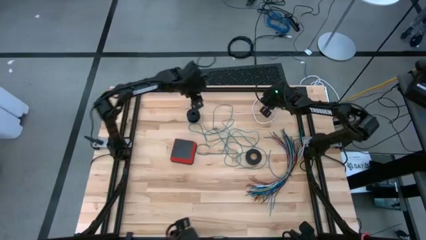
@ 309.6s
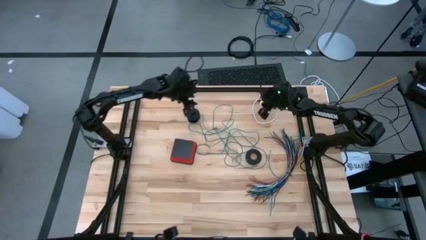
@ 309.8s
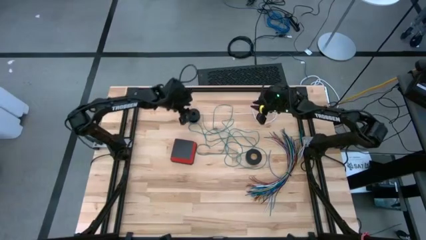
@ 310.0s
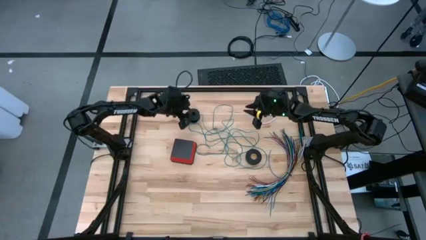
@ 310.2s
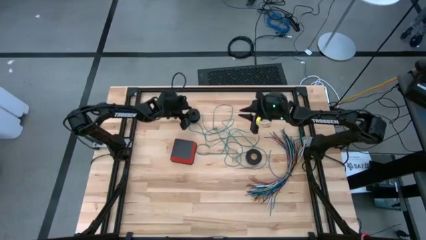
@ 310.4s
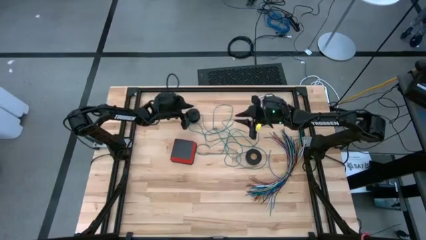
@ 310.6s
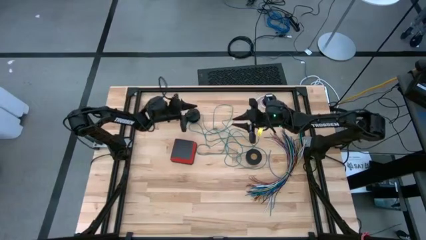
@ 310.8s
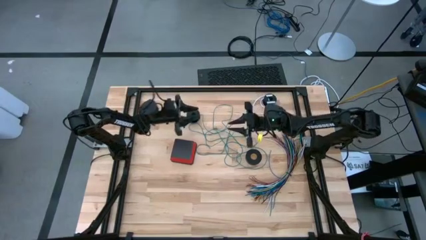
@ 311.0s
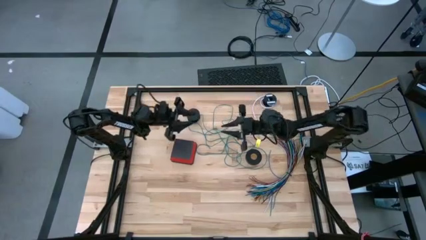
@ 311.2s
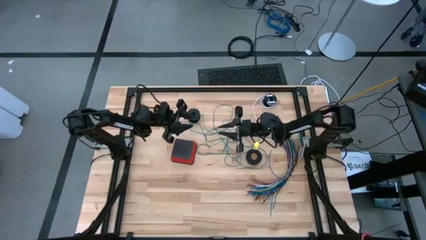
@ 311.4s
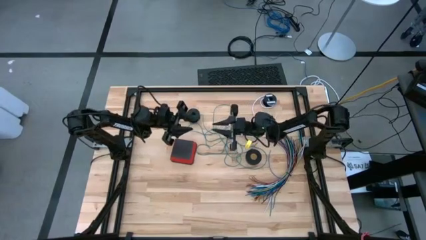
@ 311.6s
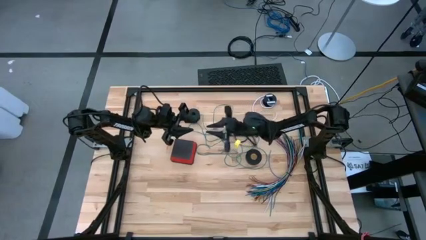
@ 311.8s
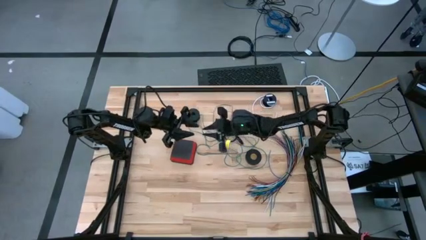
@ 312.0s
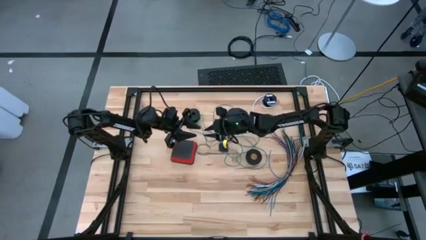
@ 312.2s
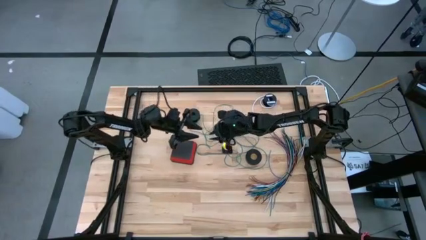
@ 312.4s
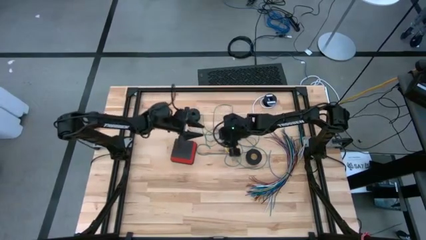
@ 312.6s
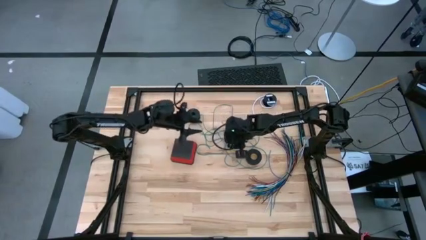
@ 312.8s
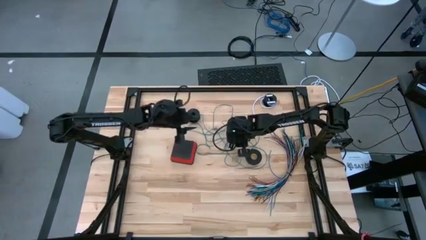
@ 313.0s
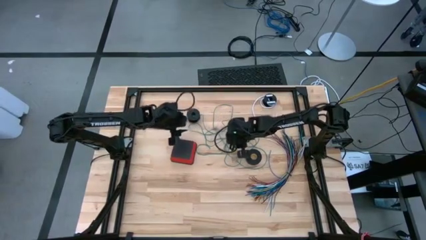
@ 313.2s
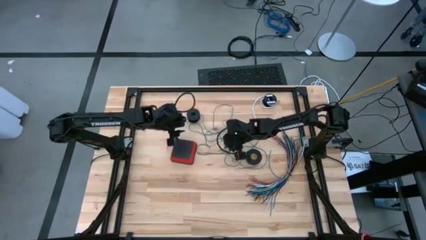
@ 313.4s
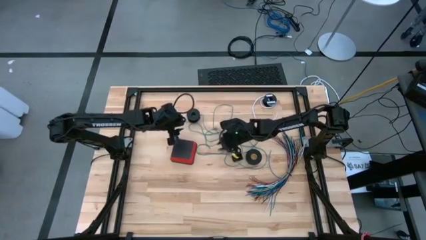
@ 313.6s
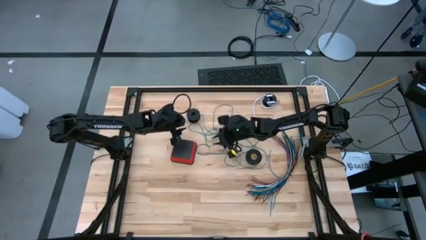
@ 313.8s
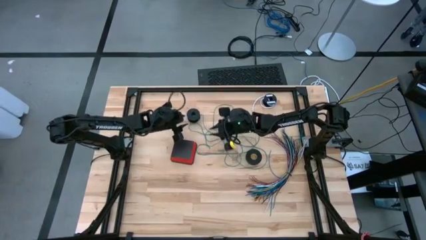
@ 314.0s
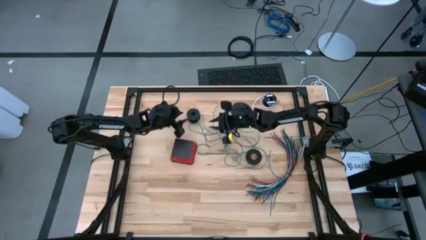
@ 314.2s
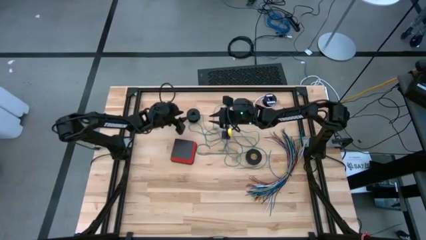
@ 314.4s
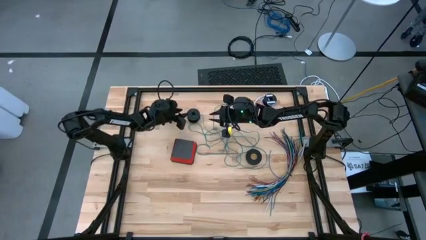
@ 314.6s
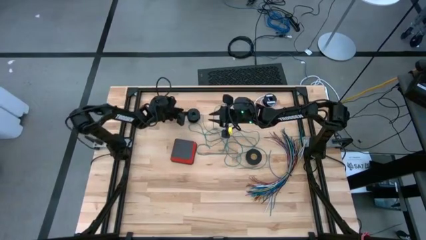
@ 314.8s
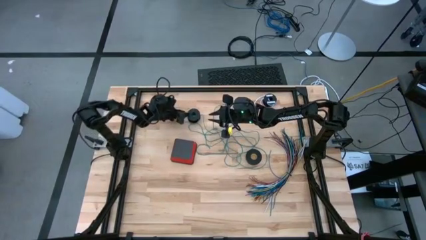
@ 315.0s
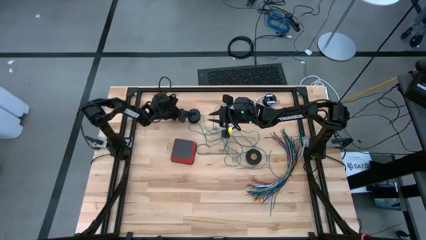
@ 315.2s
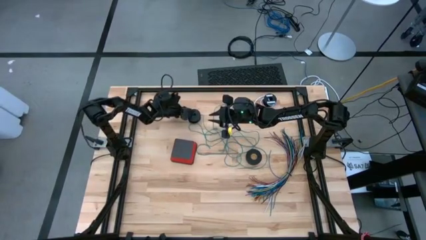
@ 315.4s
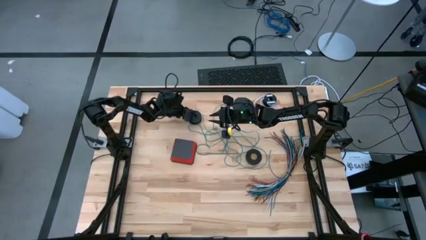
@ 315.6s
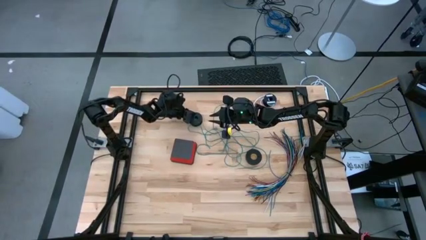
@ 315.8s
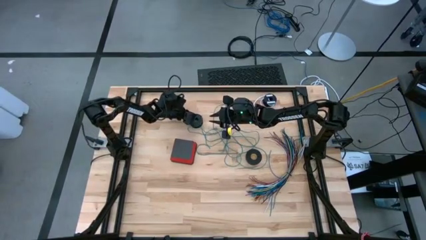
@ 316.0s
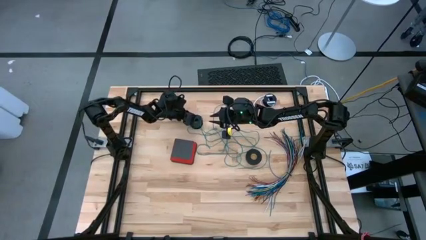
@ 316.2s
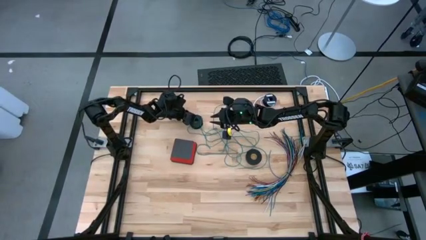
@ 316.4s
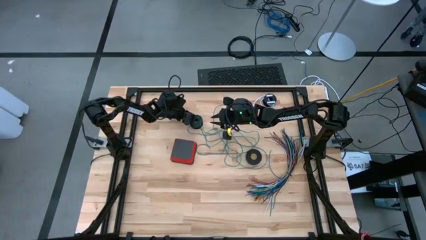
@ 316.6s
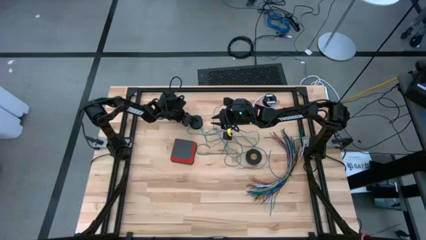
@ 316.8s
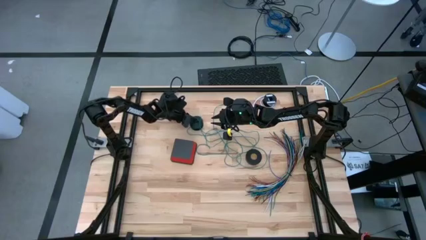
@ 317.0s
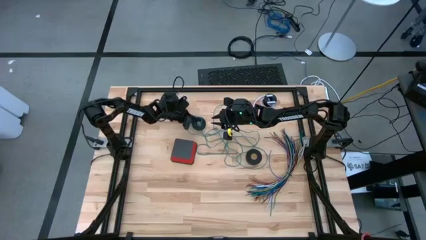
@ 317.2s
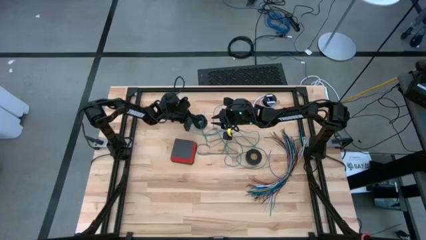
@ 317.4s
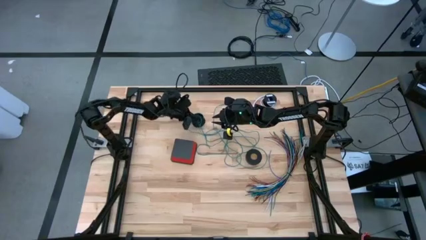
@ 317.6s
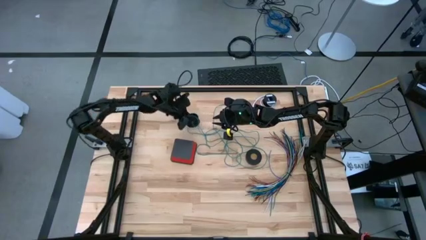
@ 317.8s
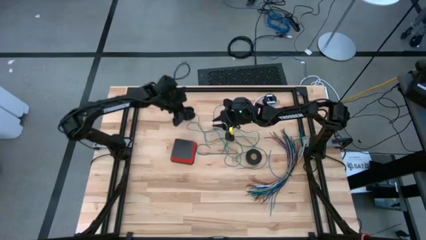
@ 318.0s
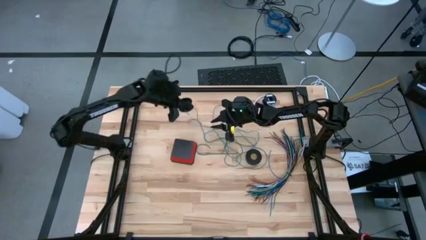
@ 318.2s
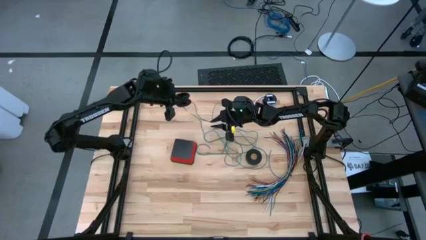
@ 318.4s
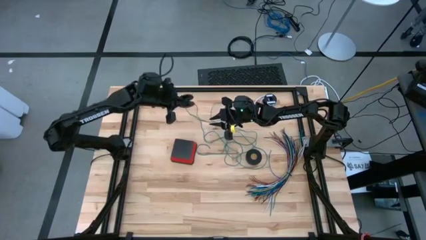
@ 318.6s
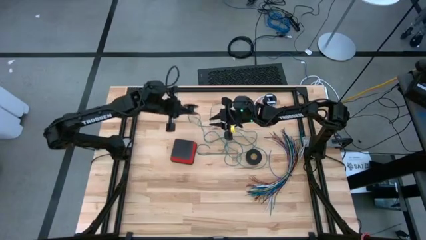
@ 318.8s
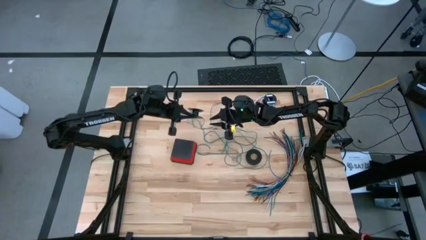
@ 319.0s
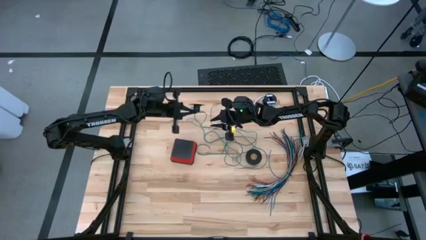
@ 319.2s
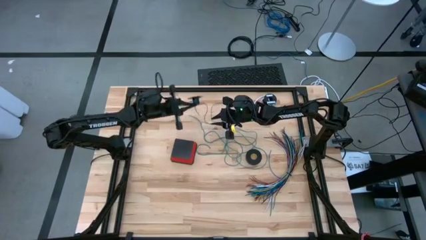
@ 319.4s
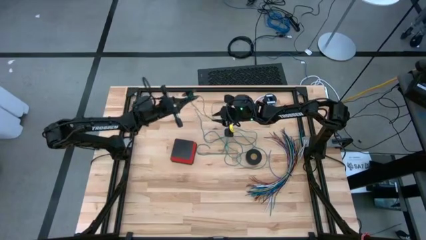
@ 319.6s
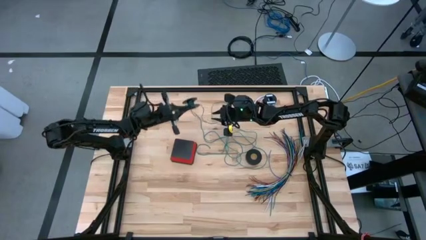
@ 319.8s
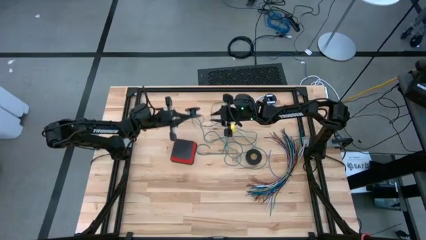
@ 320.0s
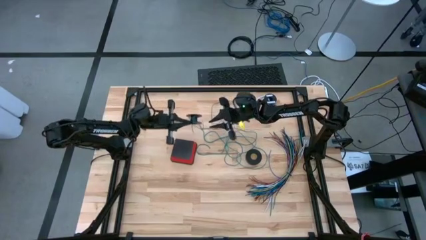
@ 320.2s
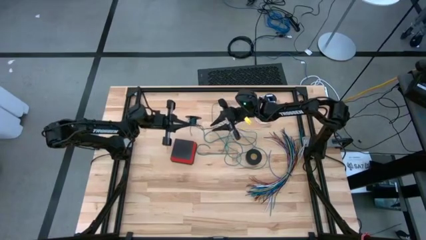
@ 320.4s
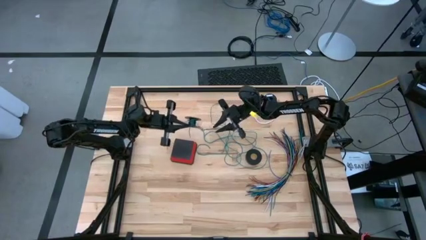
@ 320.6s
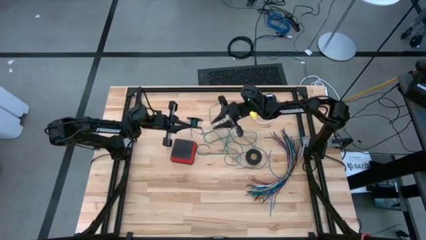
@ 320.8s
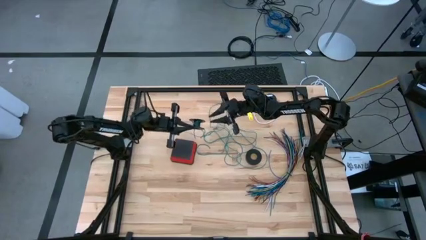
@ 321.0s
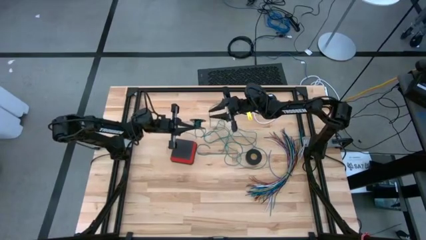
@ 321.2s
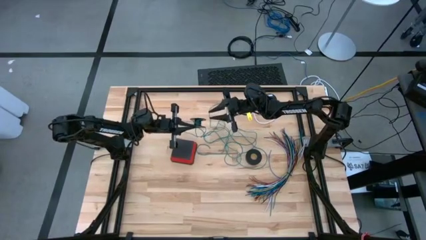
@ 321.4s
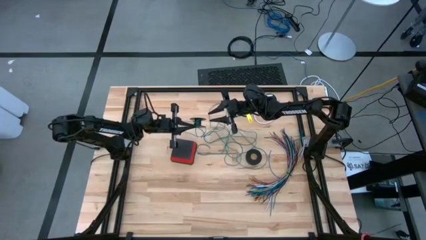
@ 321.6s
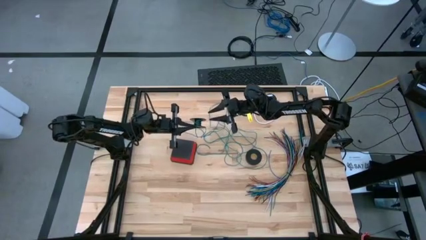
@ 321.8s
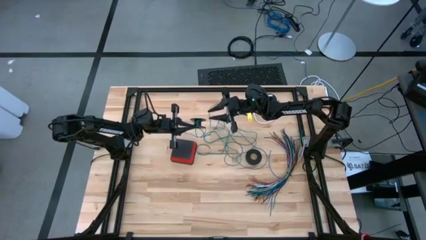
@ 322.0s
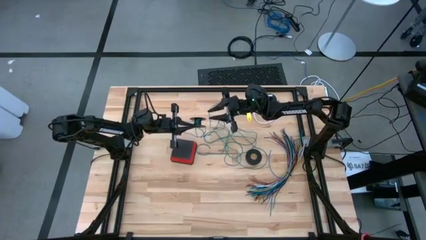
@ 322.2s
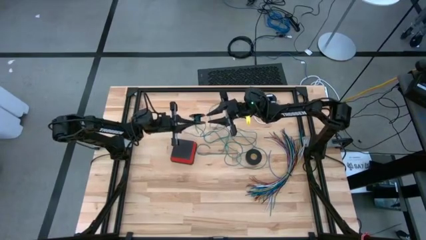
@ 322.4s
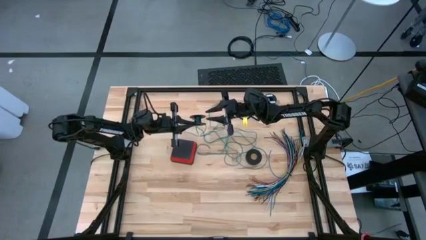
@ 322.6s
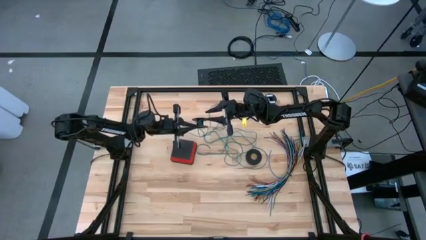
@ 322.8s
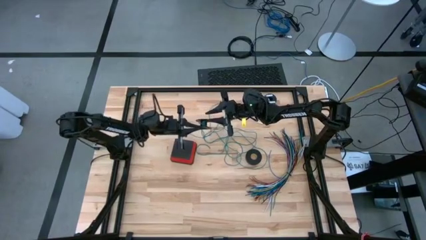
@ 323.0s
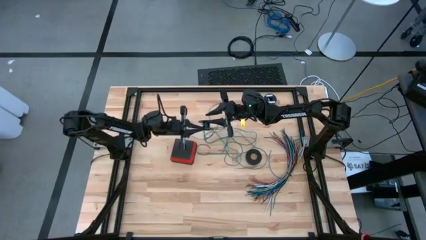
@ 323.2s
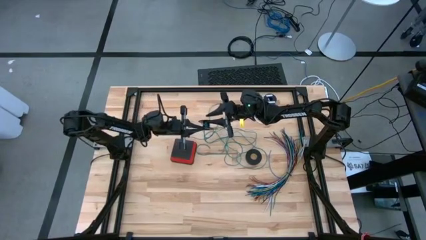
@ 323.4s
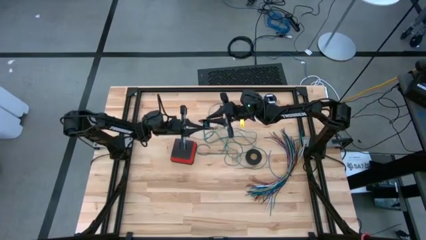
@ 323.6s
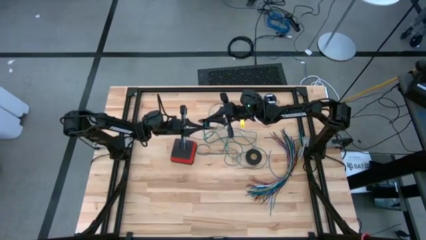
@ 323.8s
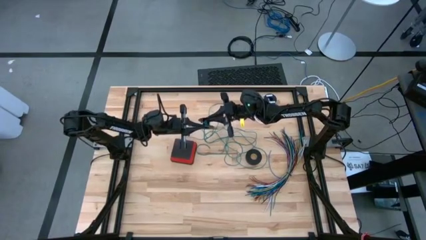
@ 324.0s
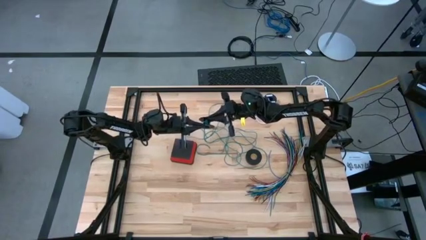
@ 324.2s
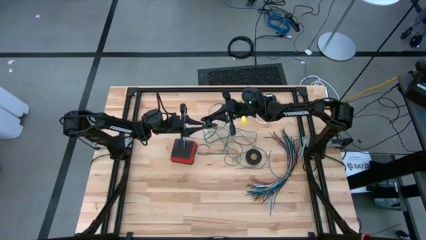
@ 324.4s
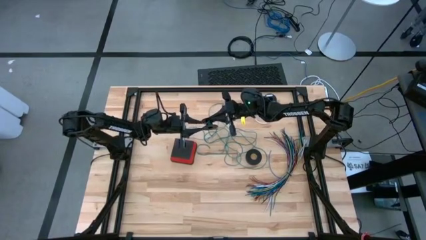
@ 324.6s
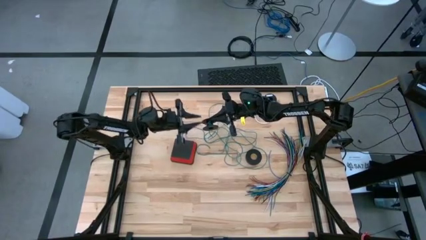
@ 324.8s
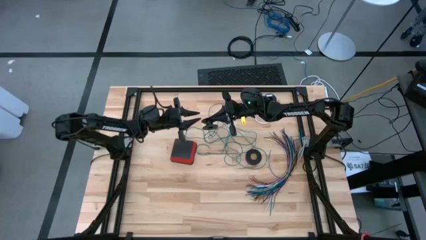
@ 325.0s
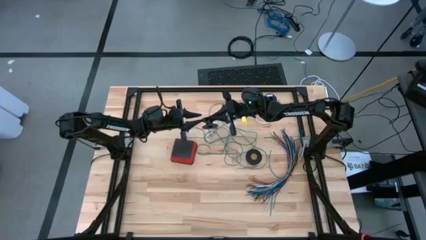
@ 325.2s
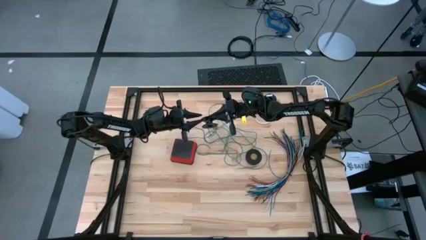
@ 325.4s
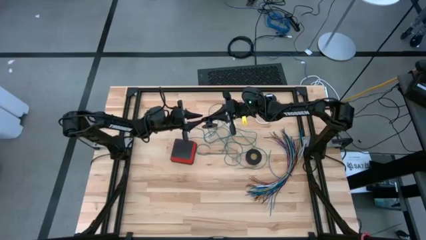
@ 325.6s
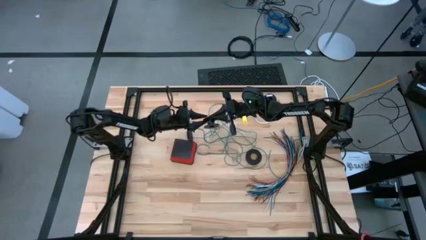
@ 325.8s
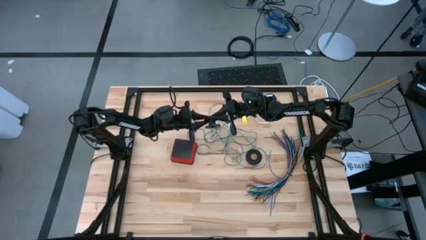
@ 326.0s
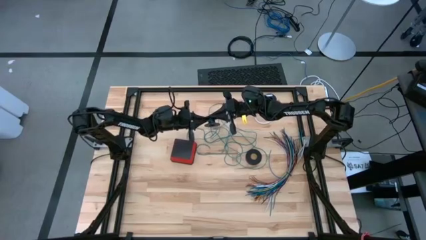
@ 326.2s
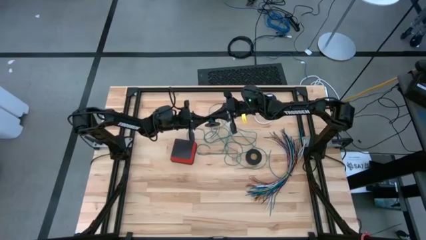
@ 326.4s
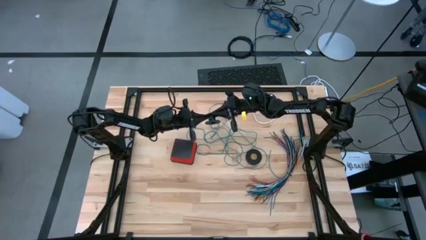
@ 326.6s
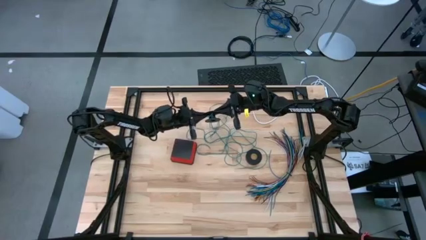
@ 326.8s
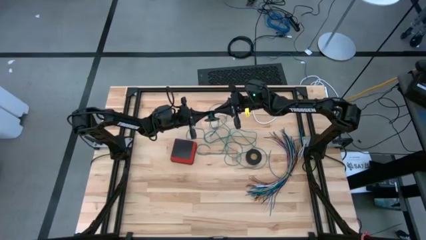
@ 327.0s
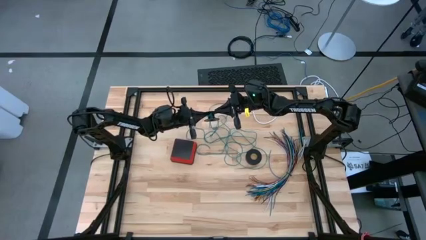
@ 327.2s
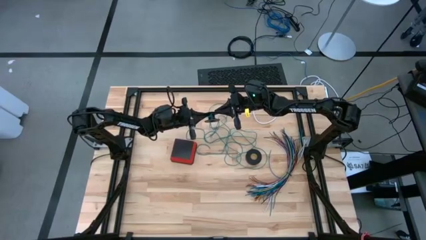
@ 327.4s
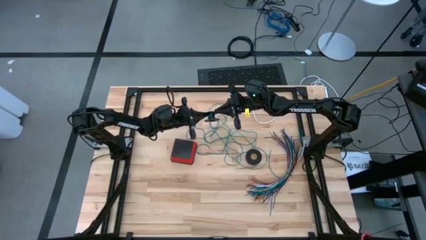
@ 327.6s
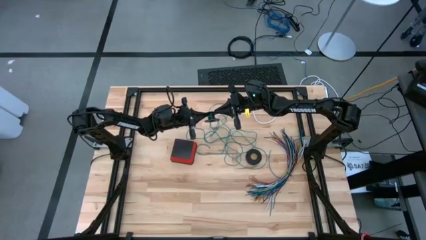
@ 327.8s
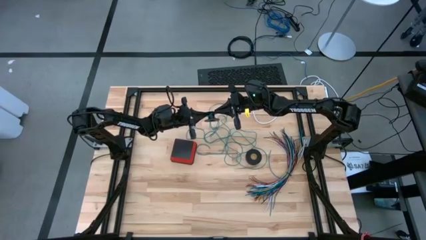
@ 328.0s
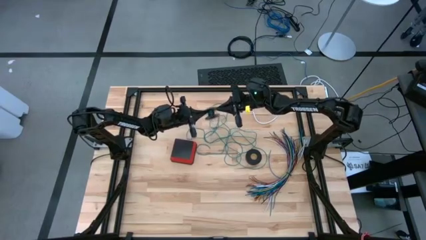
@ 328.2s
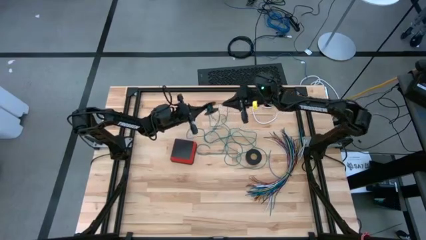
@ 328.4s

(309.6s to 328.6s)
Task: Coiling cords
Coil the green wire cable on the spool
